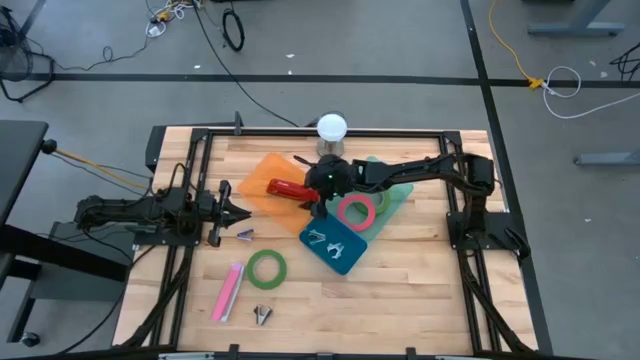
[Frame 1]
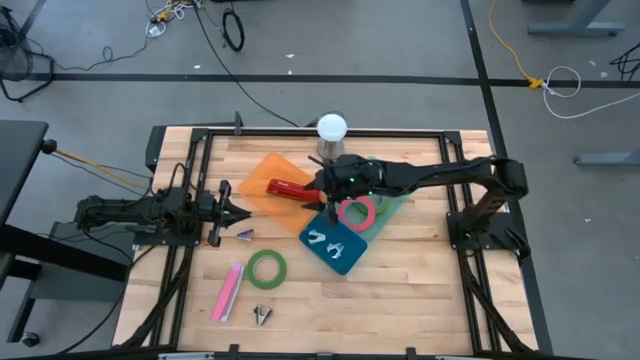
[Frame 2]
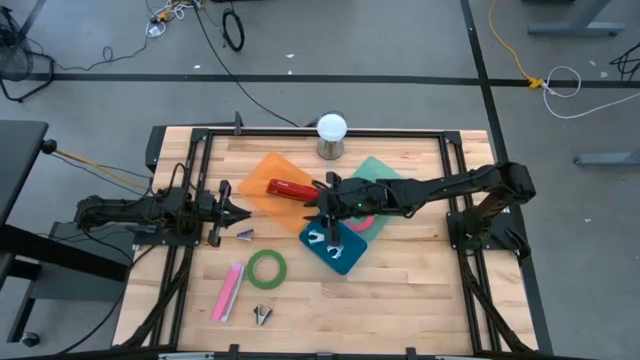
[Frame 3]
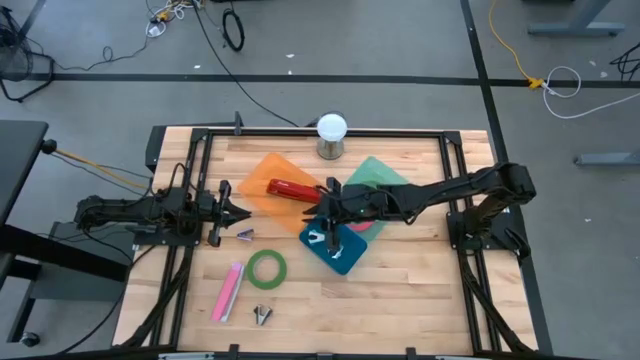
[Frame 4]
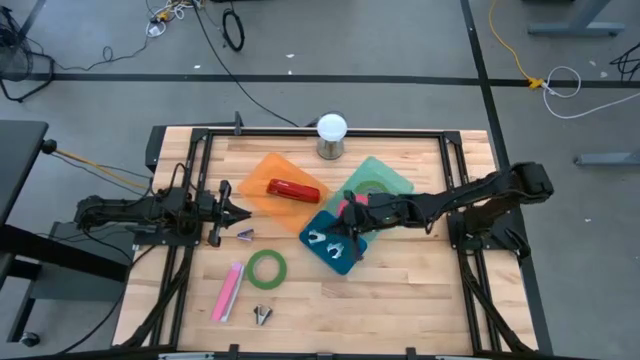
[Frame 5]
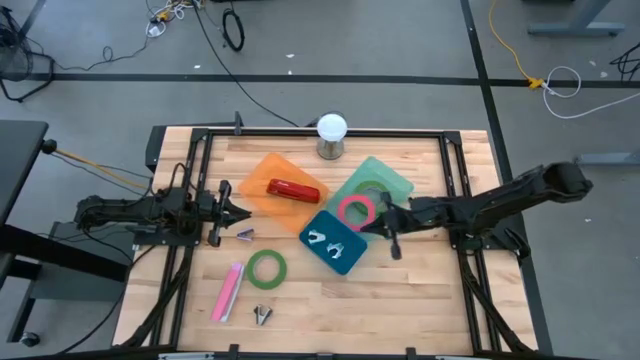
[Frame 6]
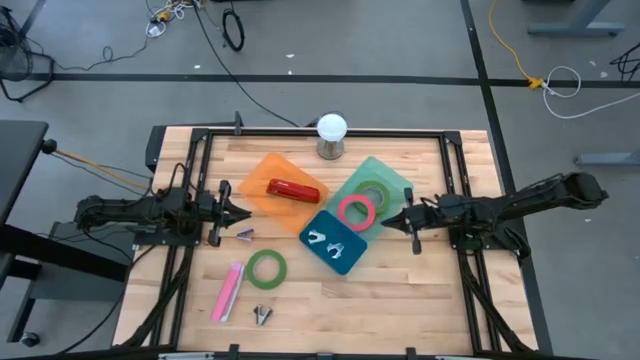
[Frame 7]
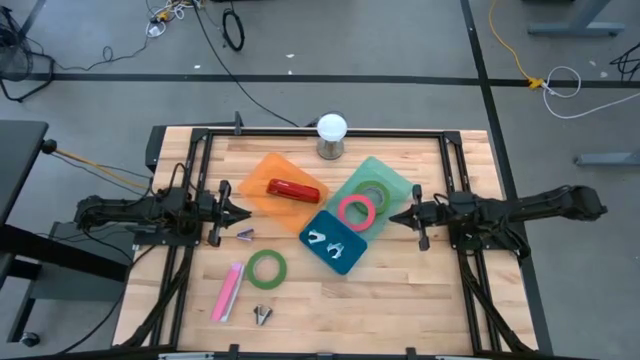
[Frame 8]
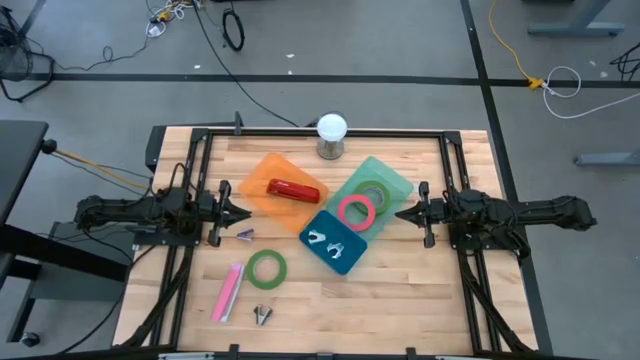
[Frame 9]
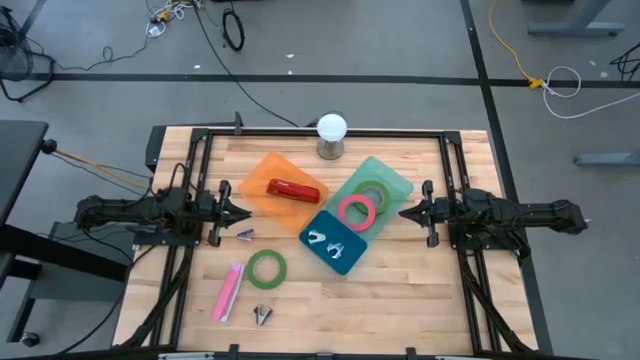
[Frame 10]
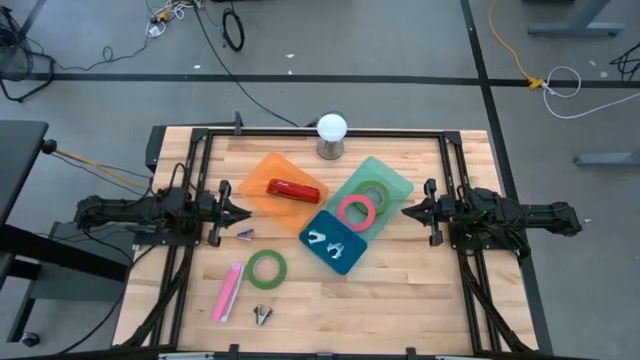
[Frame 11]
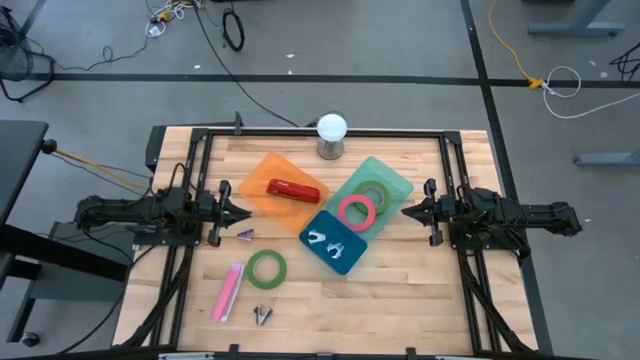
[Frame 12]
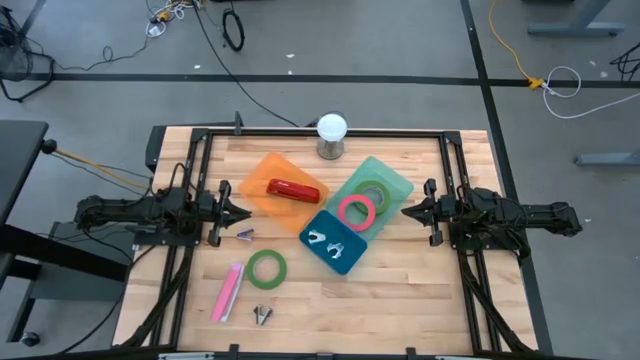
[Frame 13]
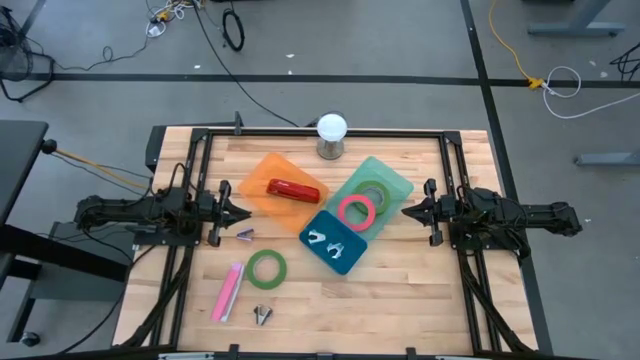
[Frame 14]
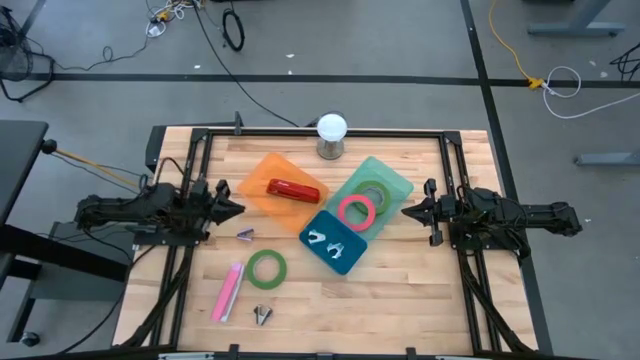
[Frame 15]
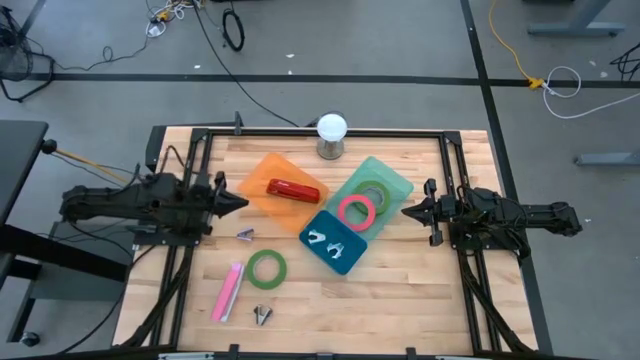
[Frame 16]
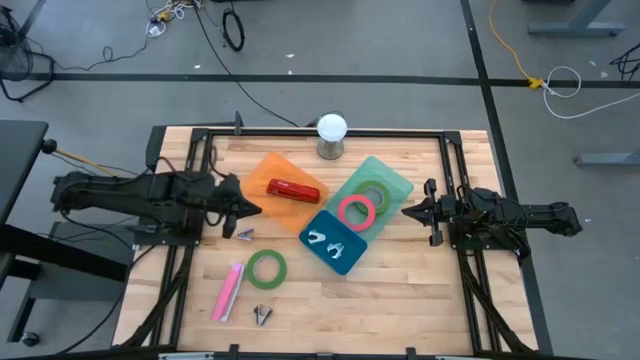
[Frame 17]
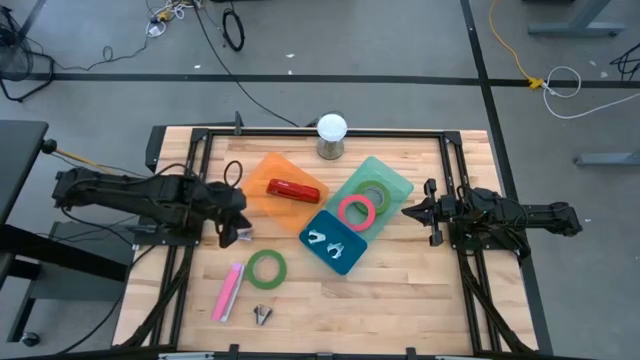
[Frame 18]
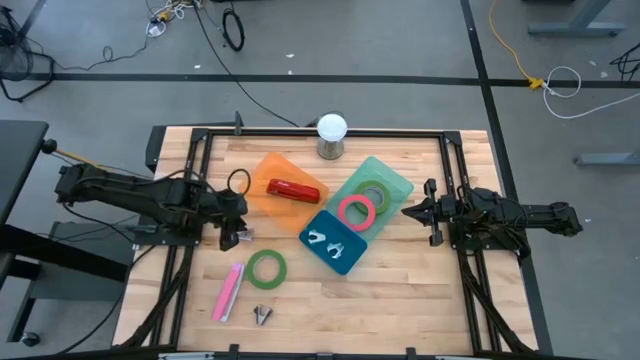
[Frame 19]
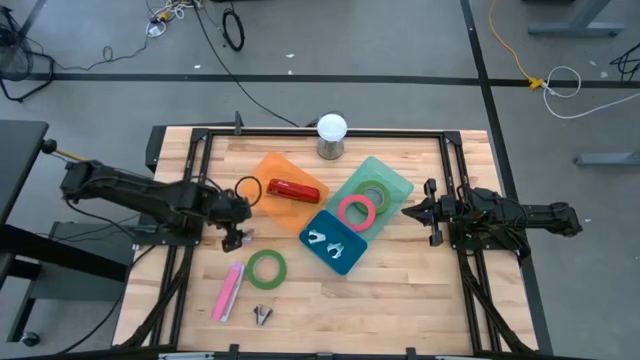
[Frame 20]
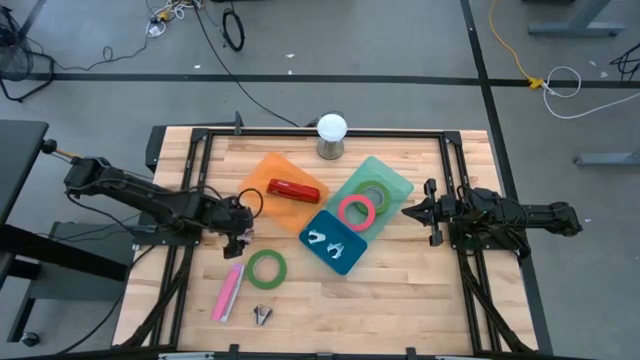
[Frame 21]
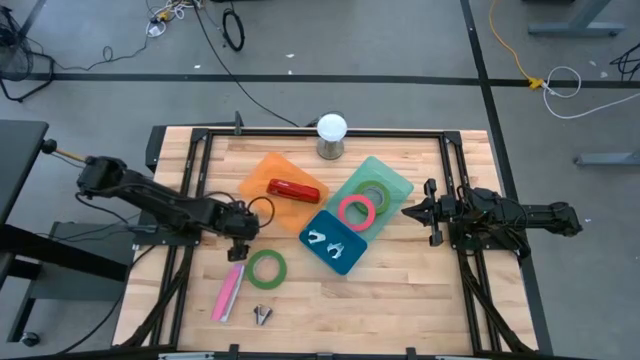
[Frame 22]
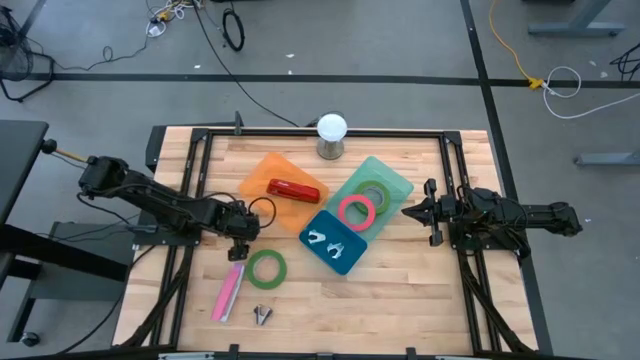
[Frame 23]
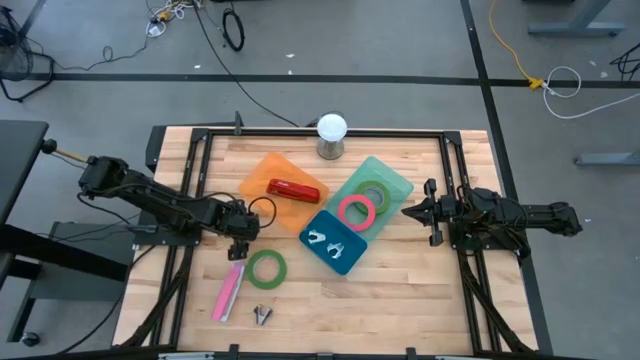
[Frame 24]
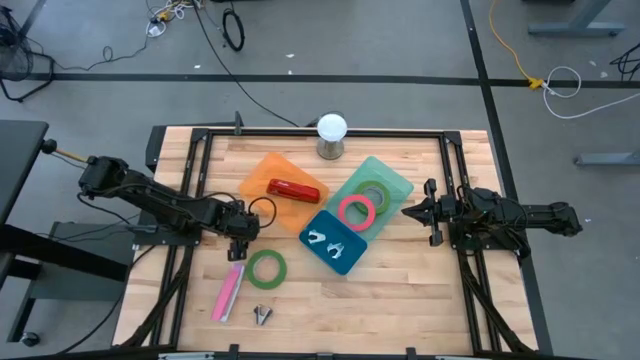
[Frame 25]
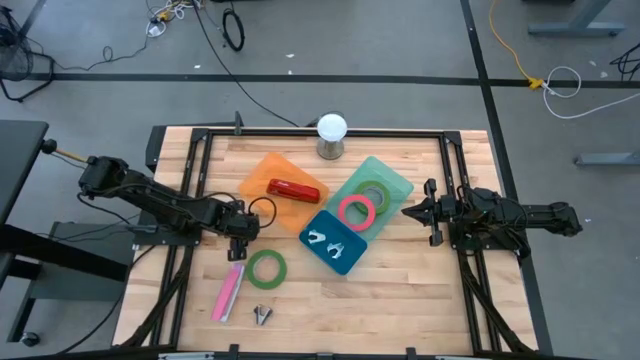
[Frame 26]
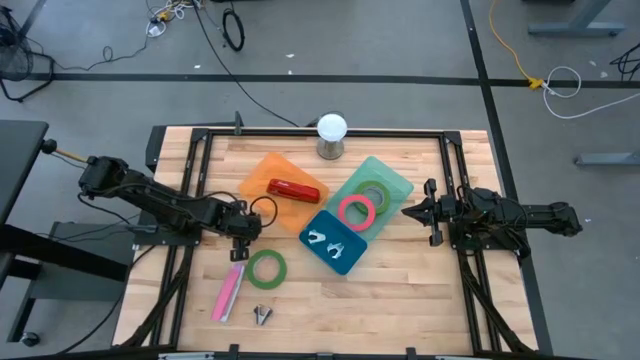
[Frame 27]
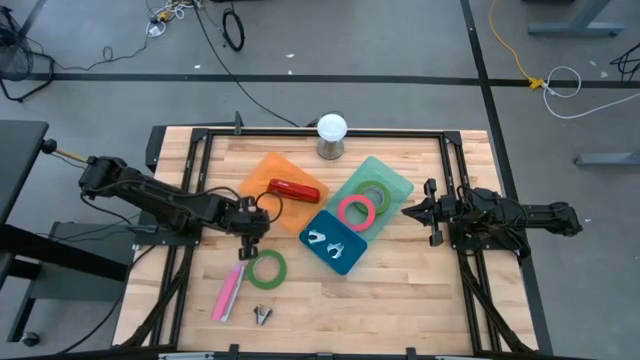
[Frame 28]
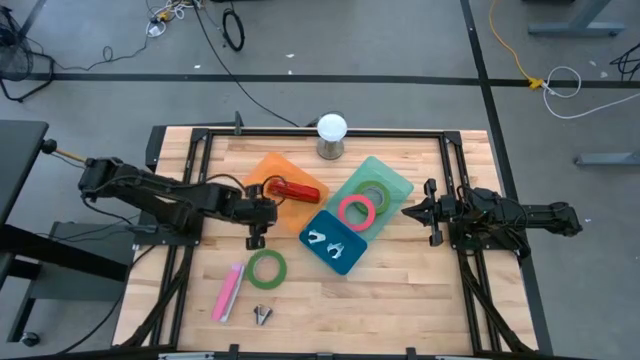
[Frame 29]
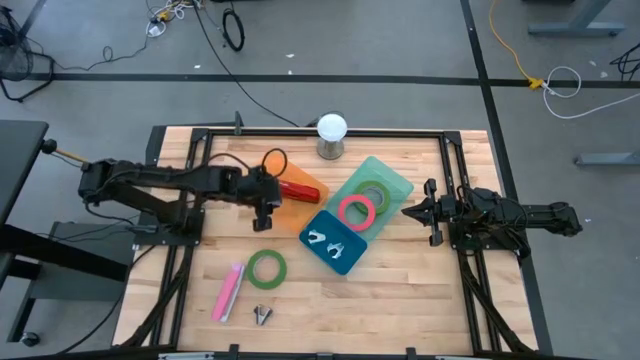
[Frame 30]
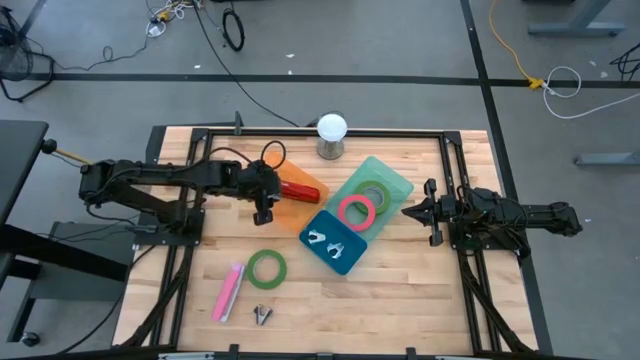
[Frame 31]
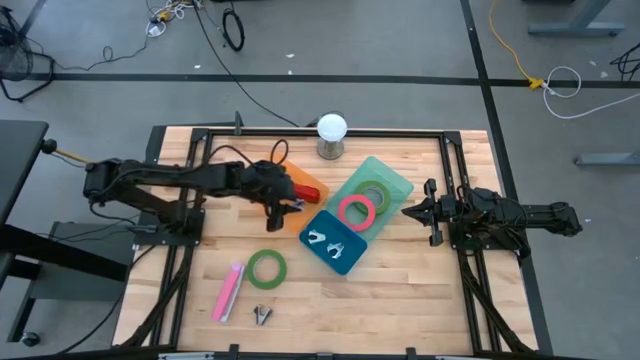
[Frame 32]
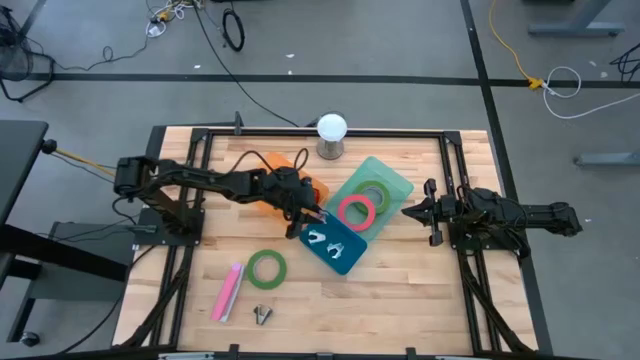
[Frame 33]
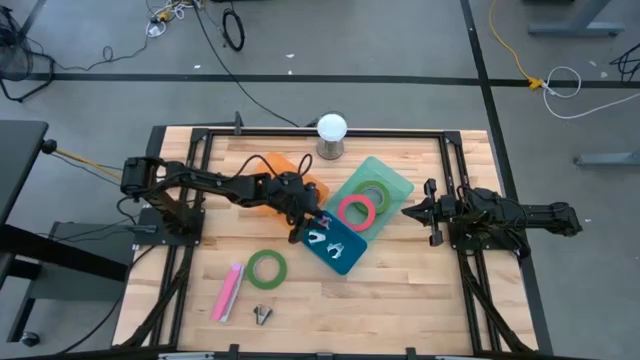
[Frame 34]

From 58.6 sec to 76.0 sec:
Task: Pick and place Stapler, Stapler remover, tape
Put the purple staple remover into the blue bin

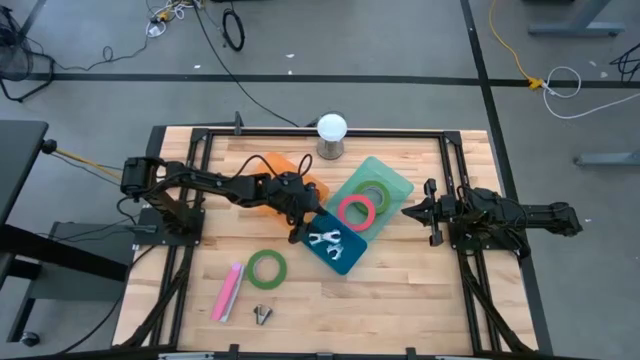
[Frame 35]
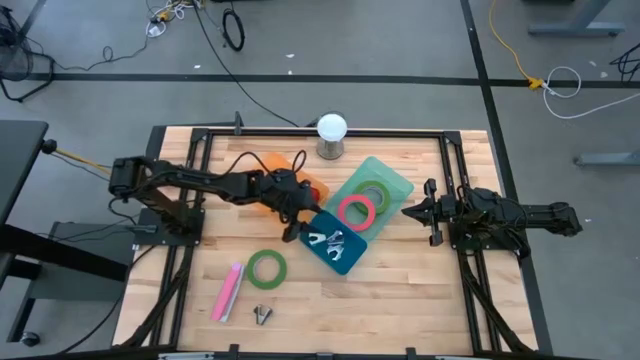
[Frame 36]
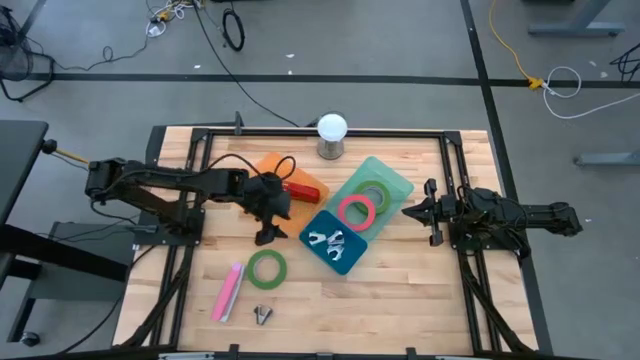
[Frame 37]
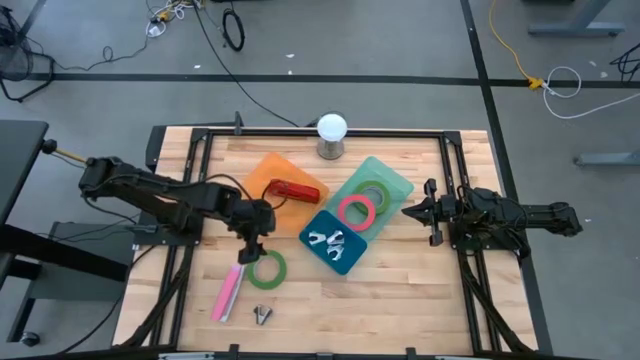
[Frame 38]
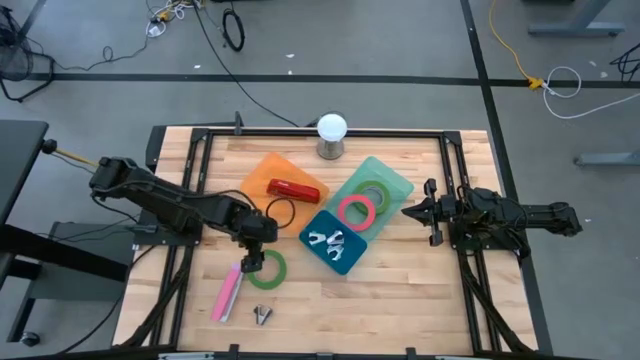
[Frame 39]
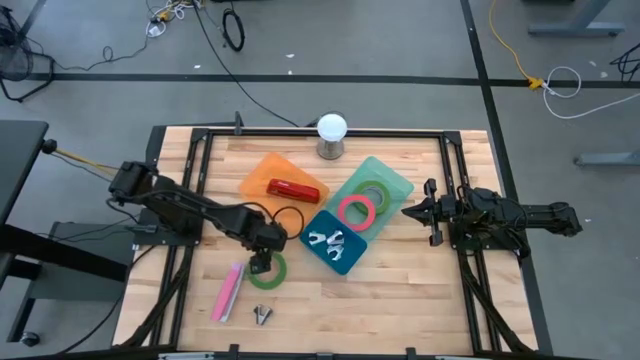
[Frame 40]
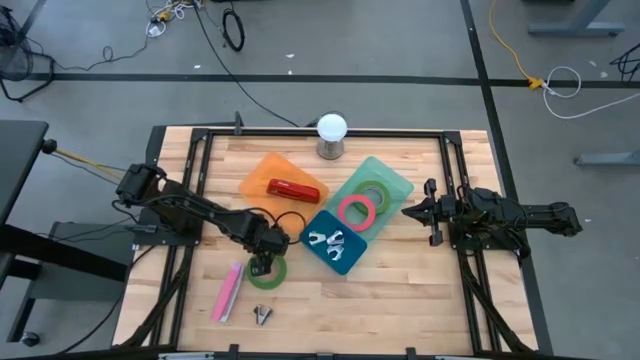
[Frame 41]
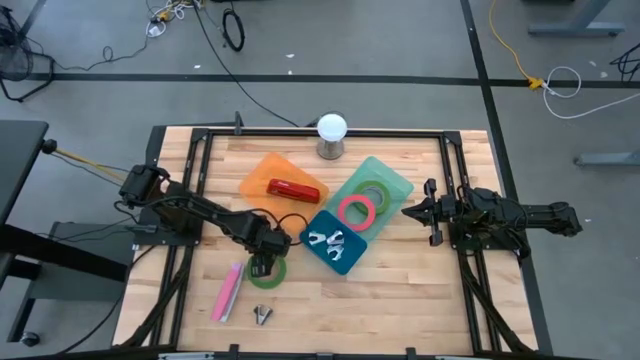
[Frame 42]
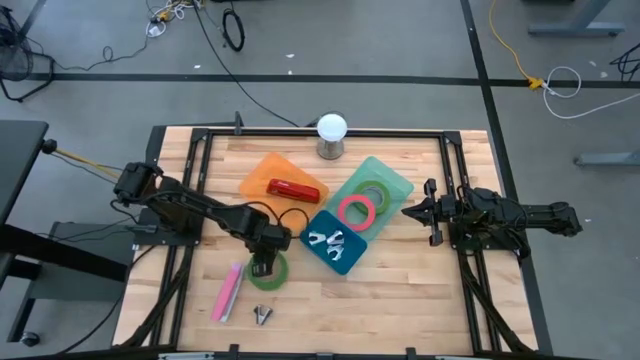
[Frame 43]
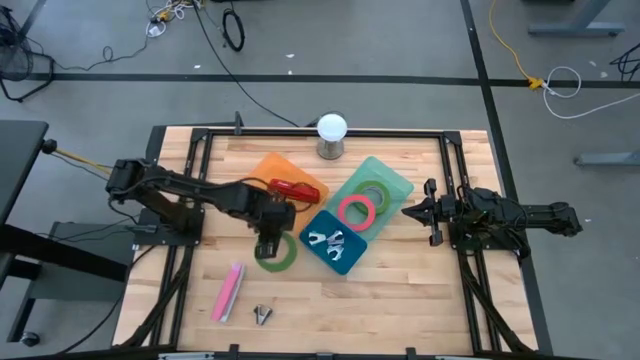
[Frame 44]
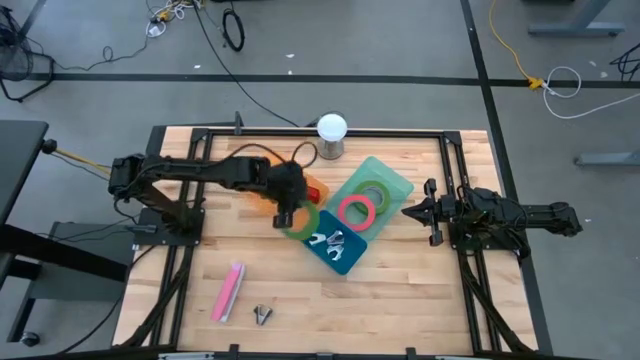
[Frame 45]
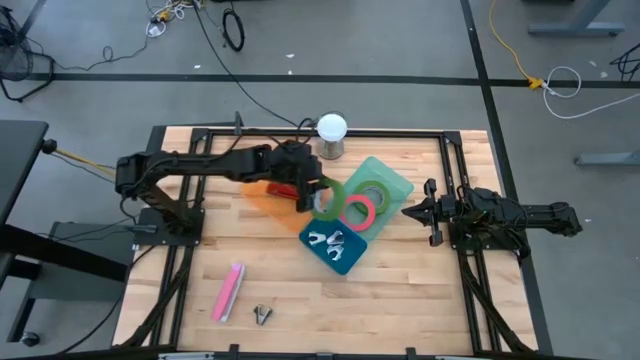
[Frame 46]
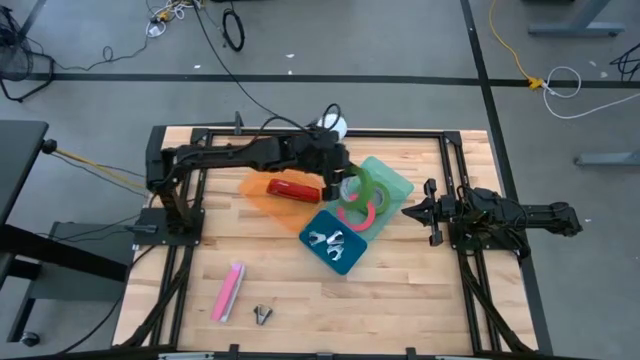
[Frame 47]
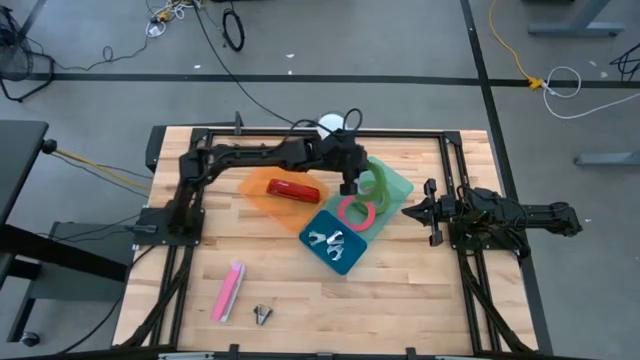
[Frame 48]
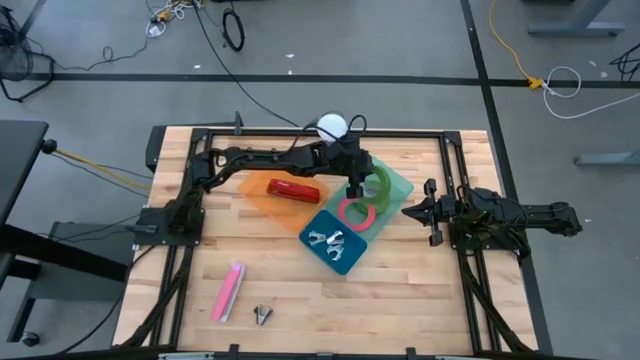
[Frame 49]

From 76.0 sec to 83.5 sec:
Put the green tape into the green bin
